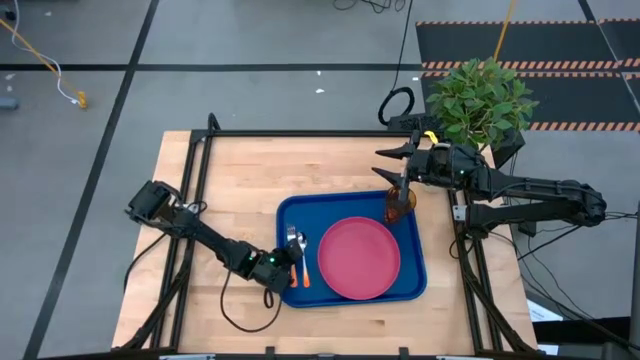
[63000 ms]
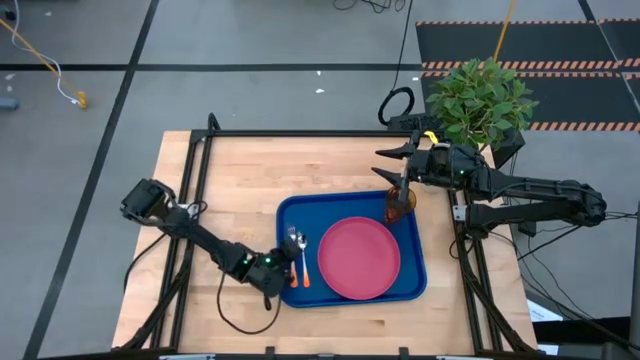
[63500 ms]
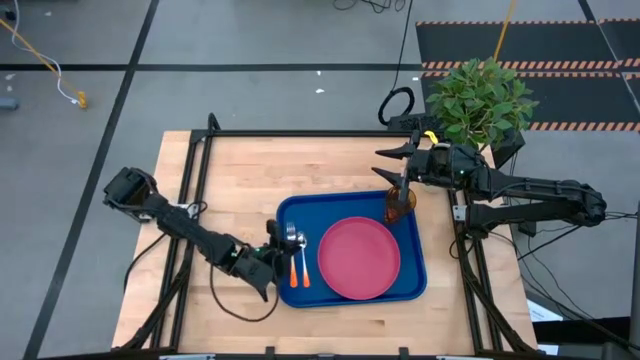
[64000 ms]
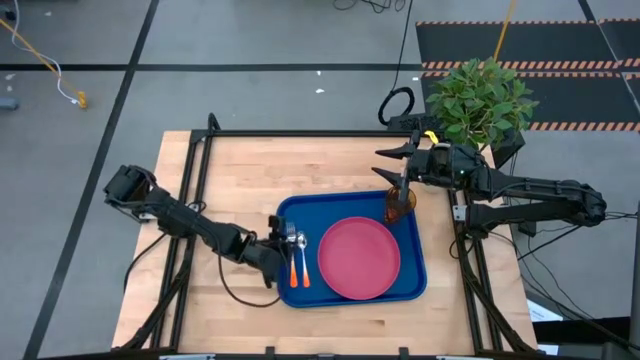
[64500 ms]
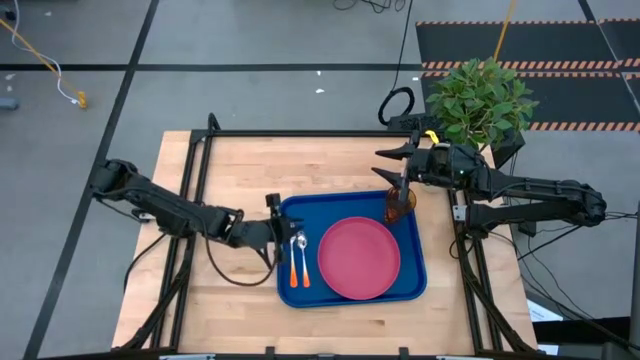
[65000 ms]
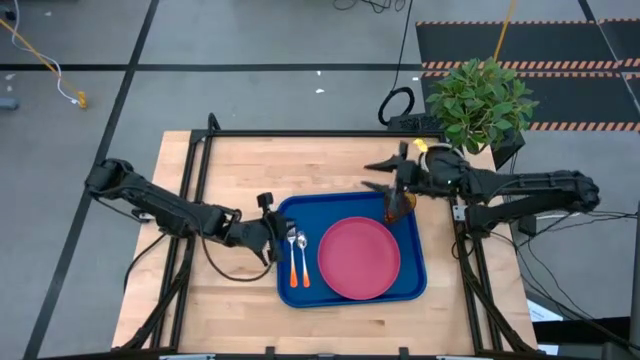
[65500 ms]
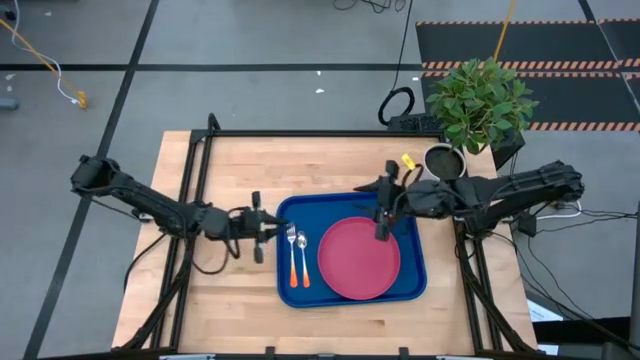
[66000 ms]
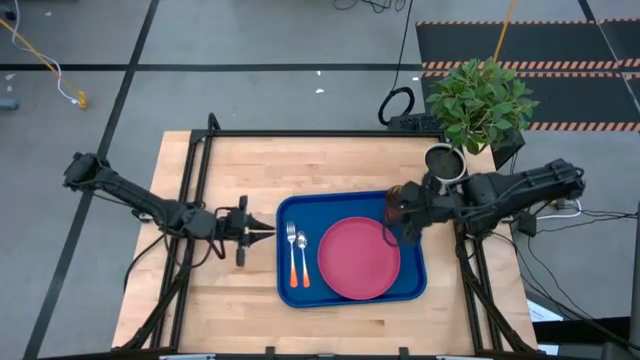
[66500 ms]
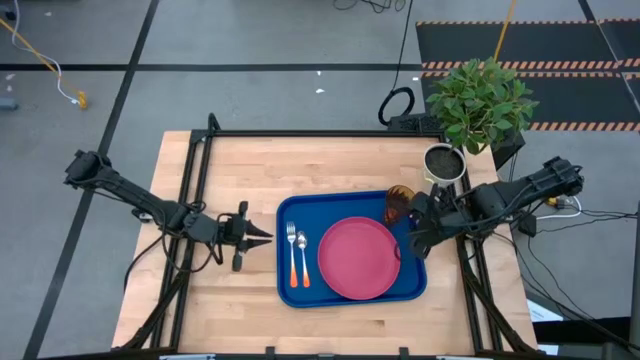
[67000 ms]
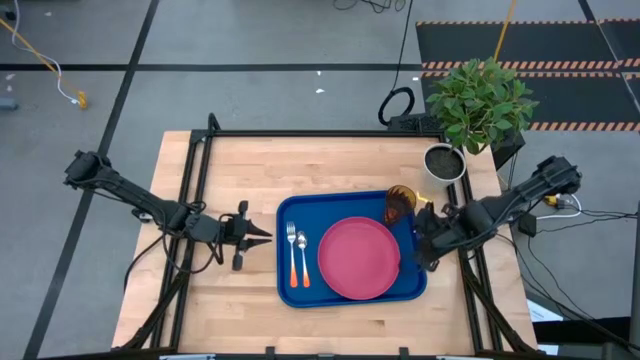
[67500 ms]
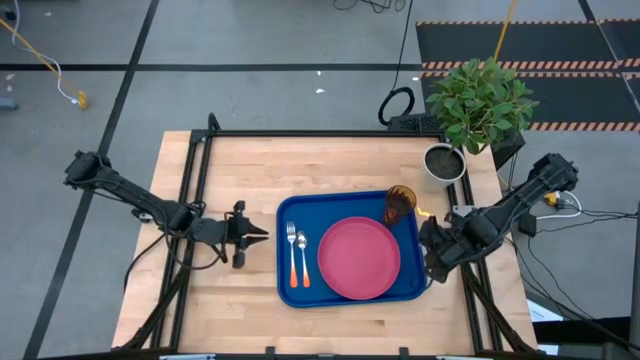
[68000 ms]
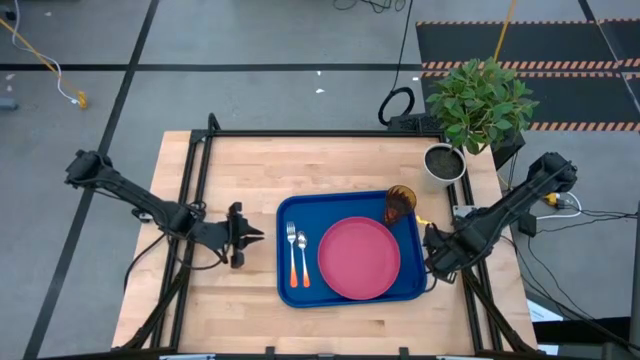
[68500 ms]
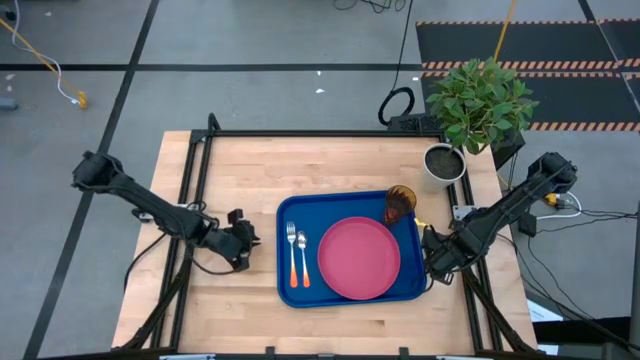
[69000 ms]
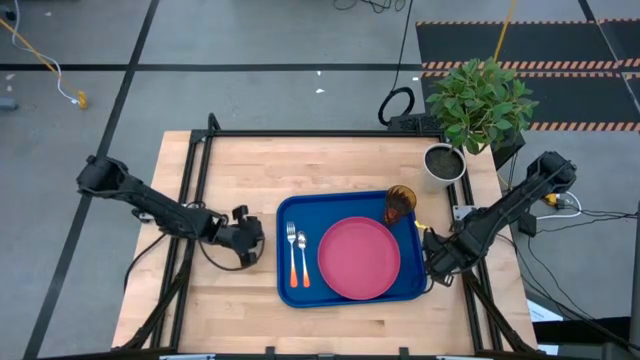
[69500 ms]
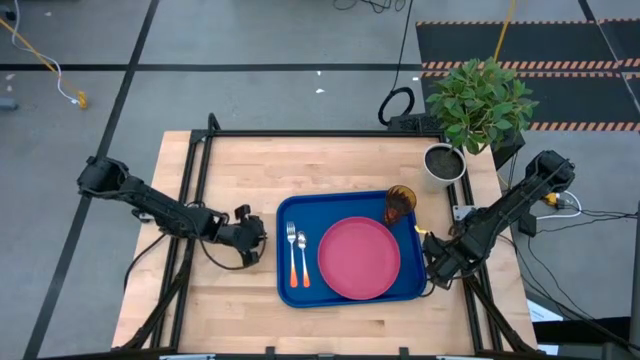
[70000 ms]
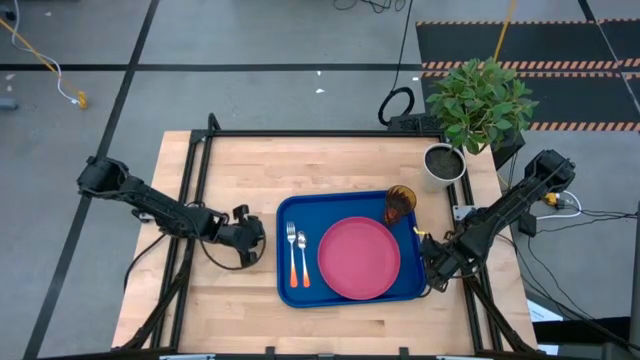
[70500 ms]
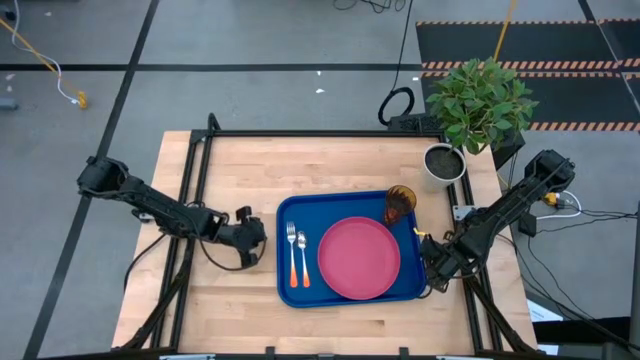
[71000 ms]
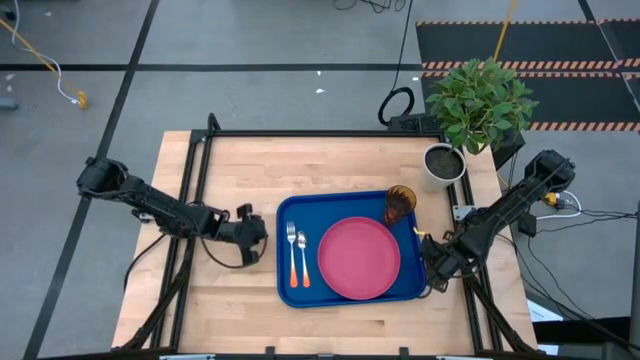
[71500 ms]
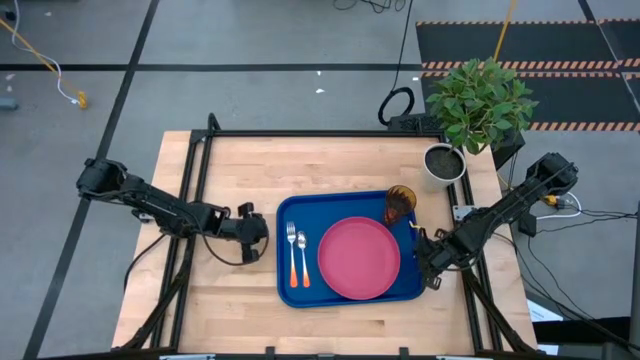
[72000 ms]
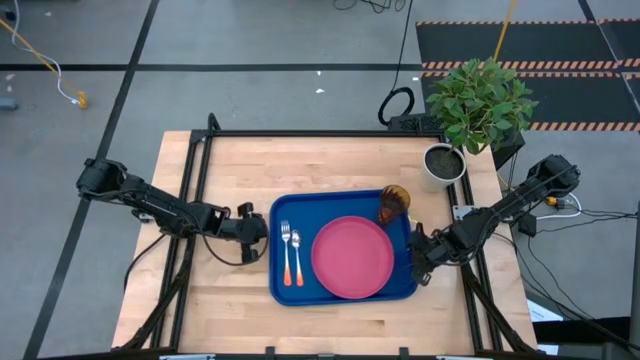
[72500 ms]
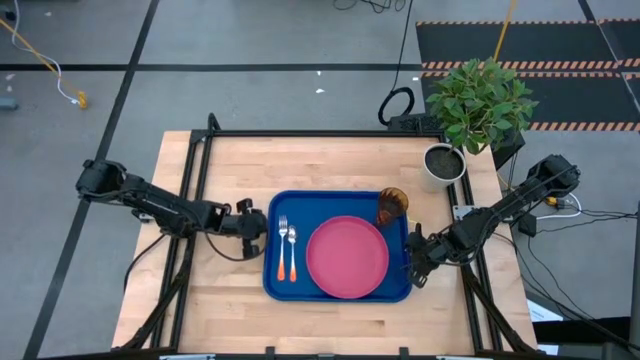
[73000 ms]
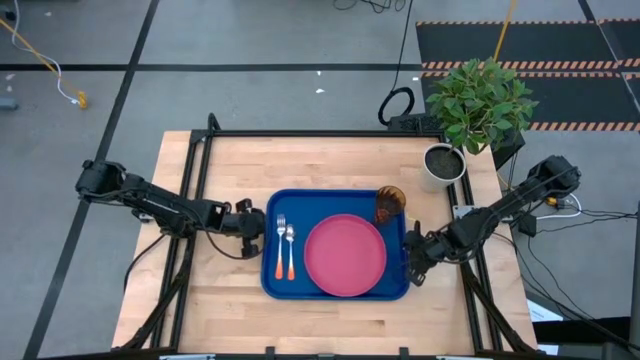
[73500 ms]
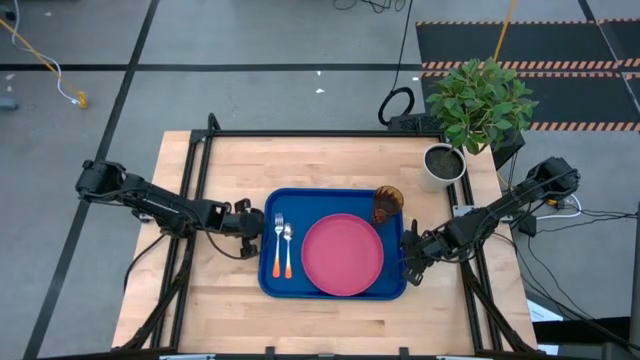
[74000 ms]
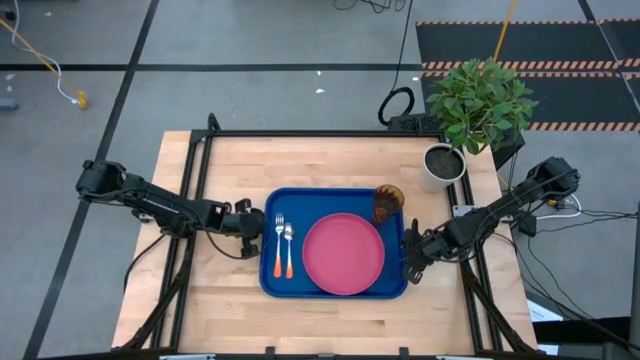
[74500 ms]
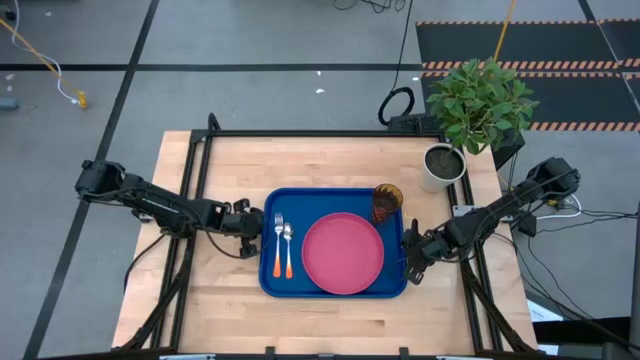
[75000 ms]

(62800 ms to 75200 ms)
Task: Pick and place plate/cup/fork/spoon on tray
Adjust the blue tray

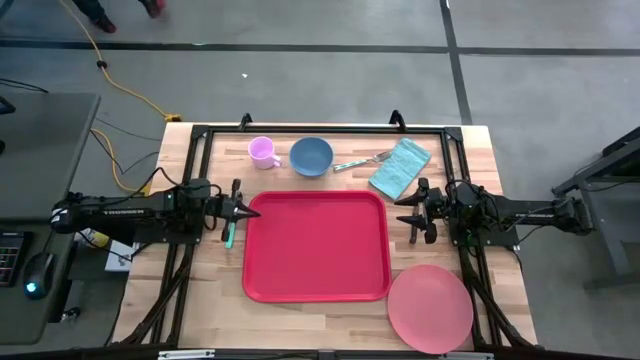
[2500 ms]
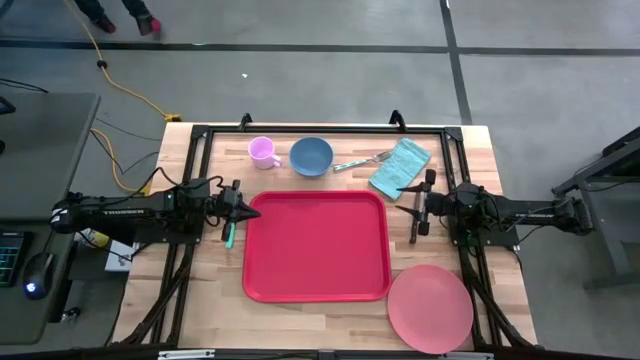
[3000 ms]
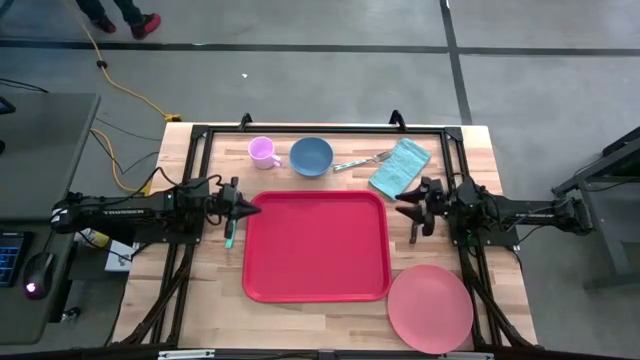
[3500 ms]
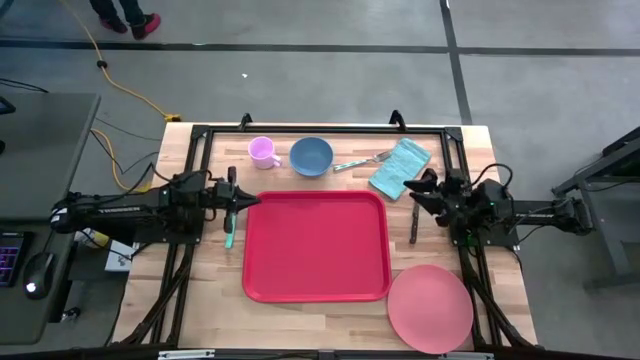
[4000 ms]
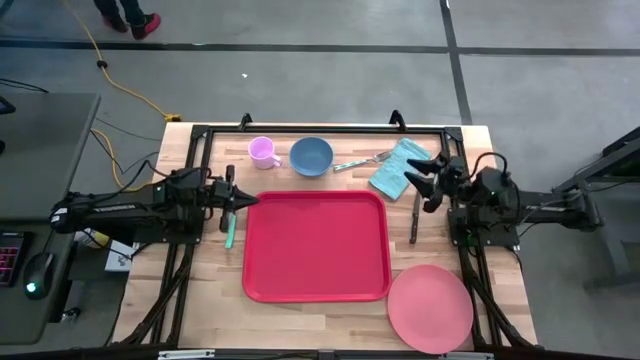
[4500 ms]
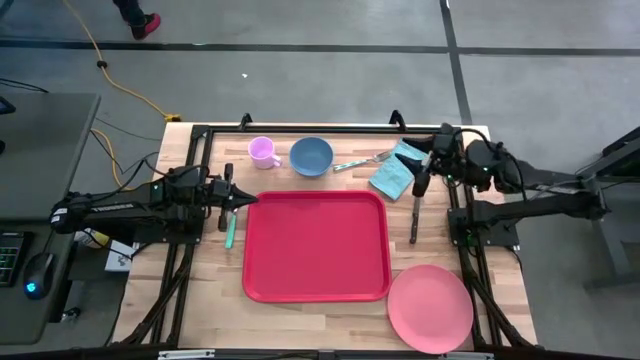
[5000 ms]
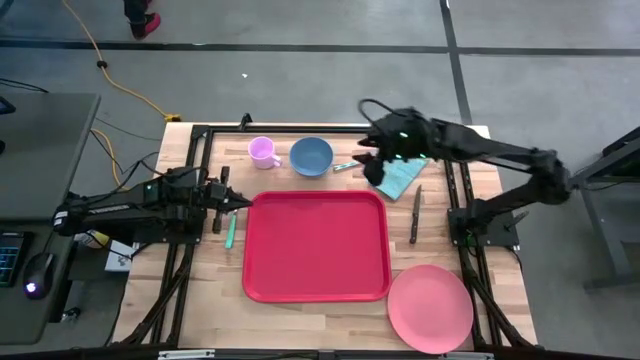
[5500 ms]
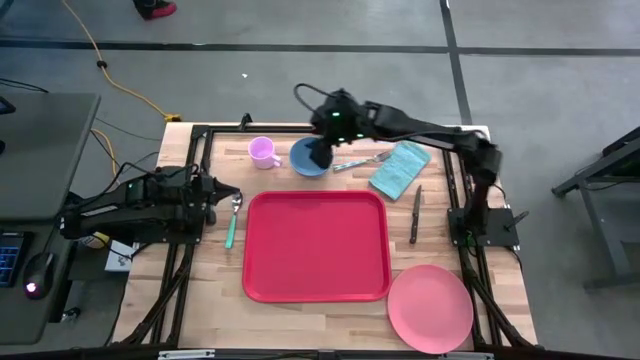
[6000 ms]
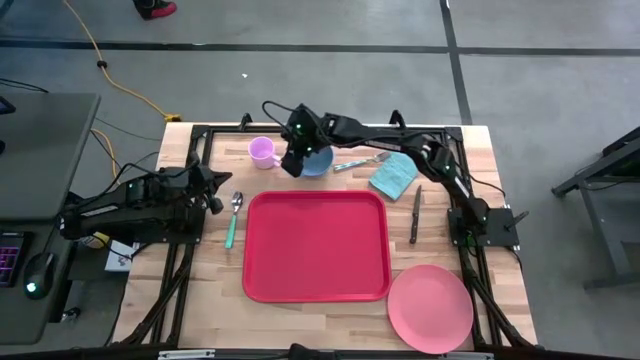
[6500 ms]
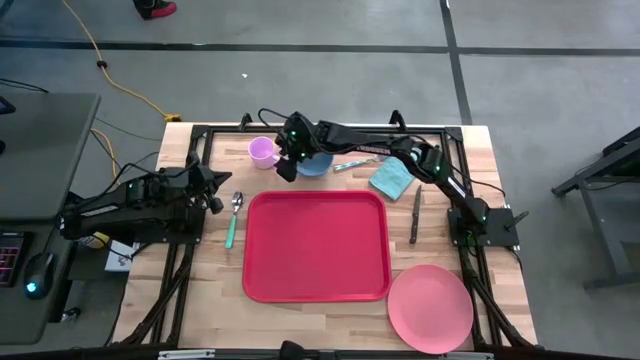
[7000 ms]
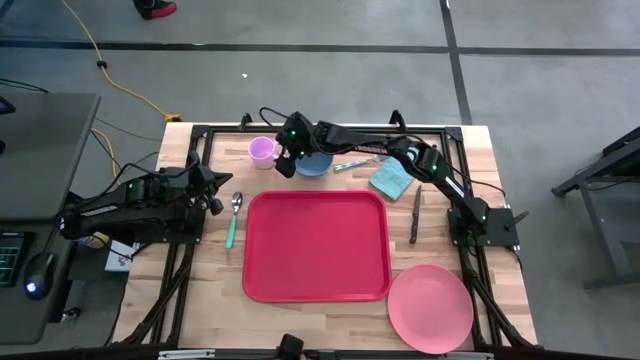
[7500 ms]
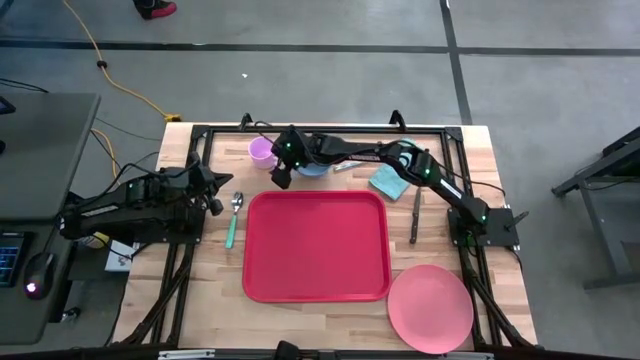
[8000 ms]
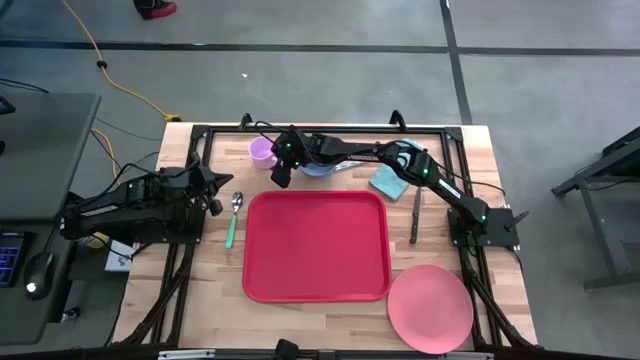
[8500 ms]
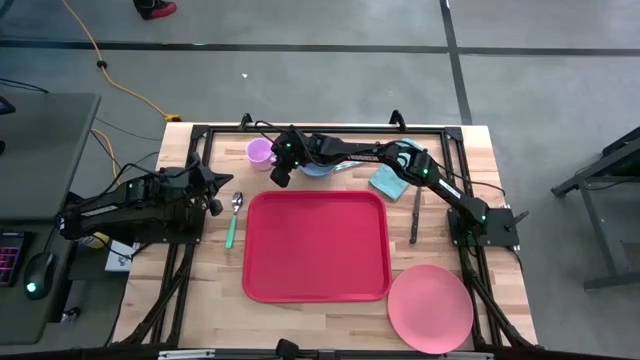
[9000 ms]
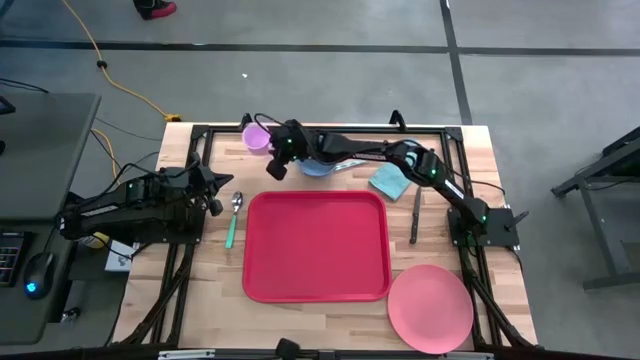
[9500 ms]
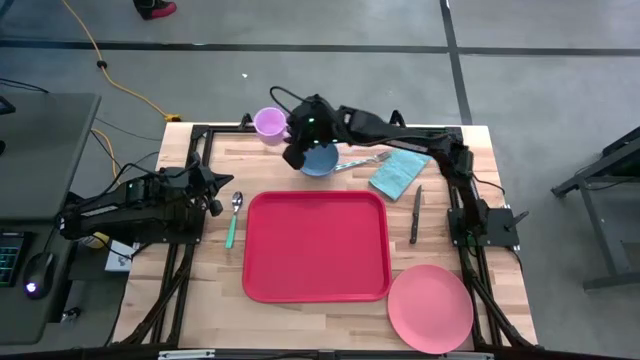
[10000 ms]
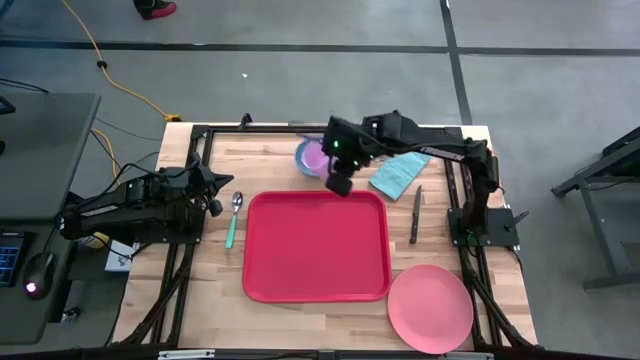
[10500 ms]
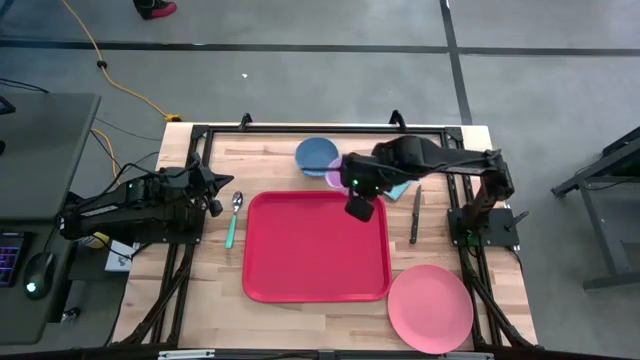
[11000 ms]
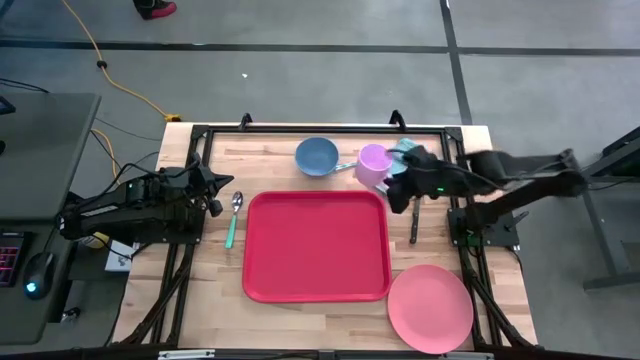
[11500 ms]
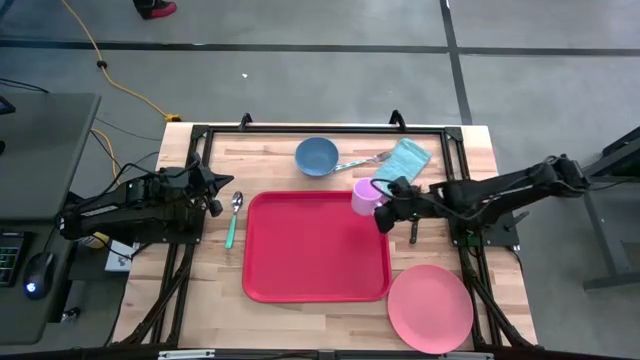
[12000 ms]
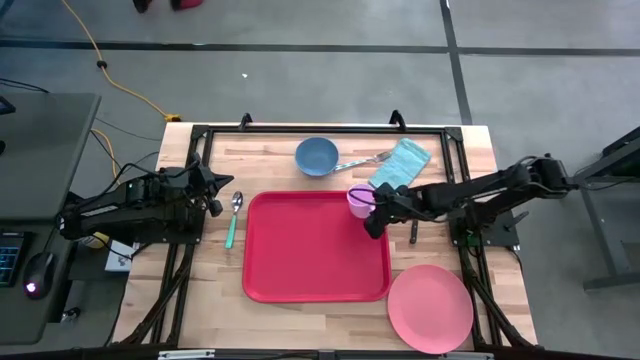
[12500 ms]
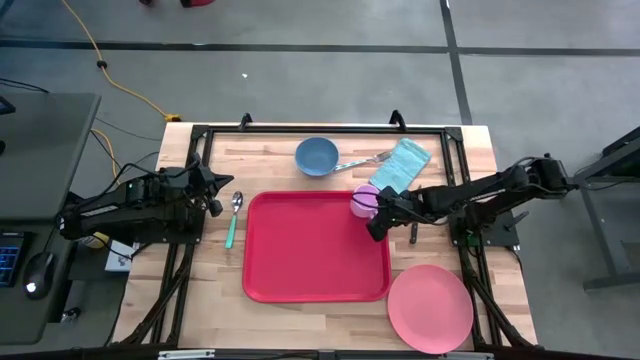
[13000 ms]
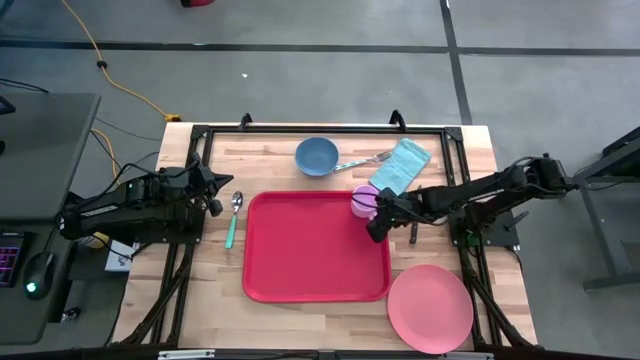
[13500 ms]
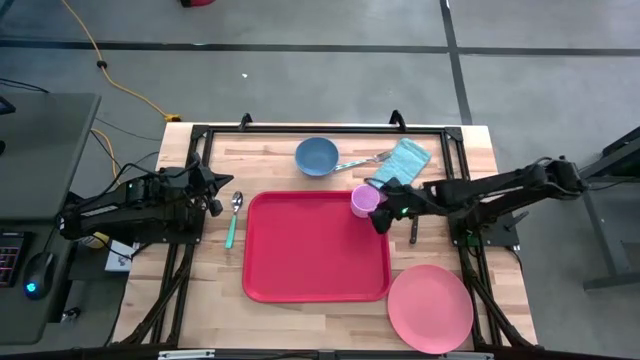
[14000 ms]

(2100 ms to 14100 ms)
Task: Set up tray
Put the purple mug on the top right of the red serving tray
